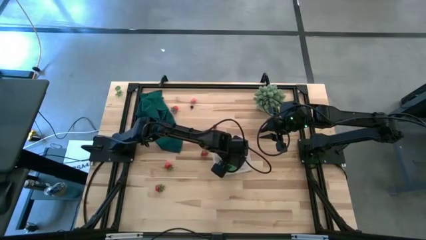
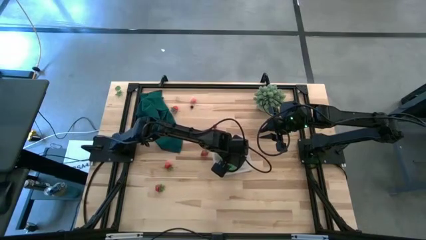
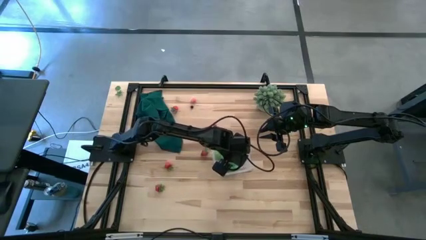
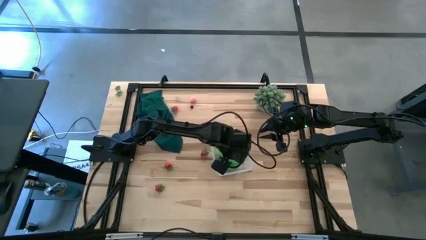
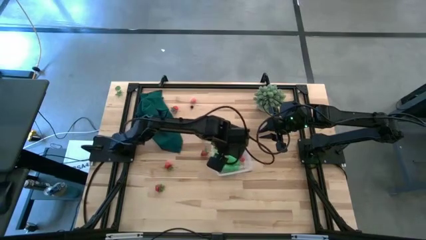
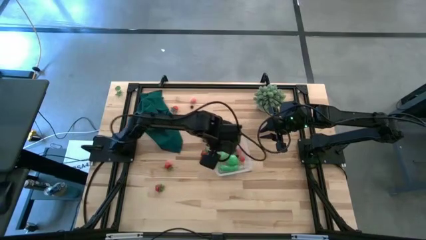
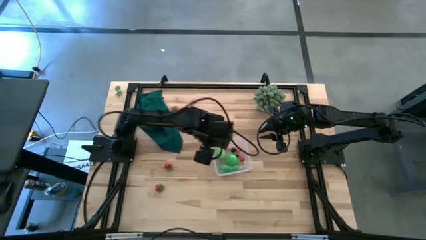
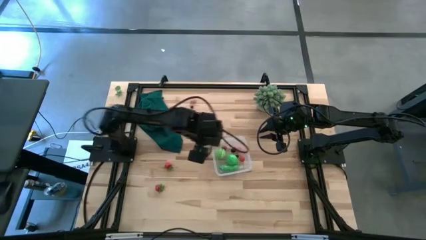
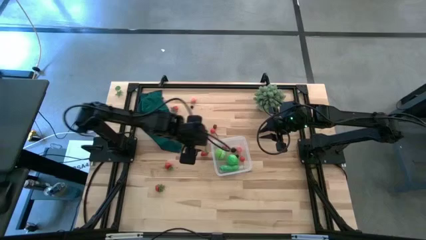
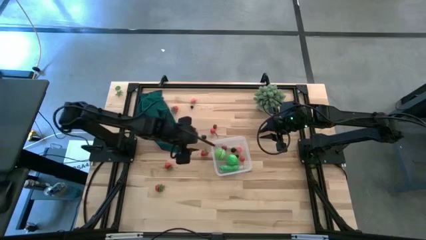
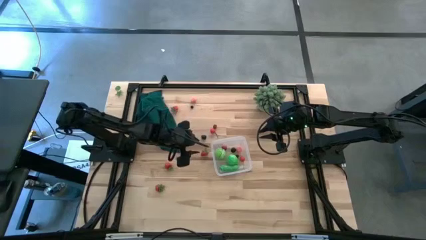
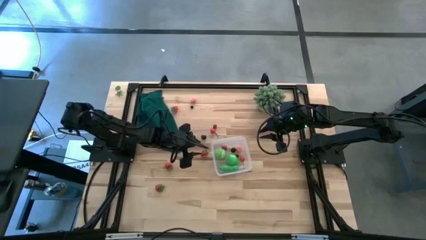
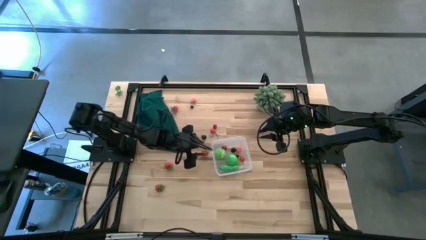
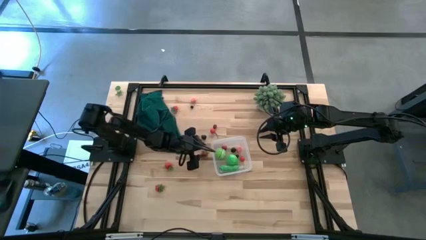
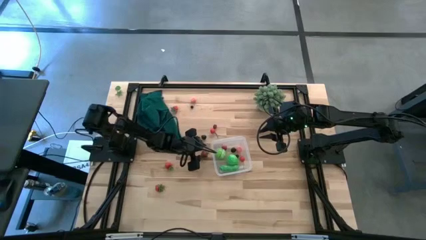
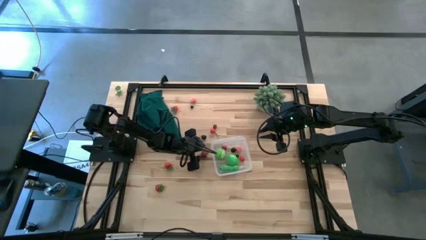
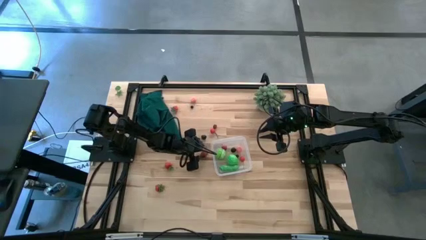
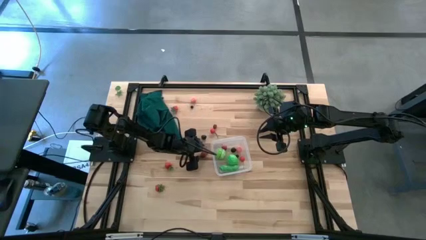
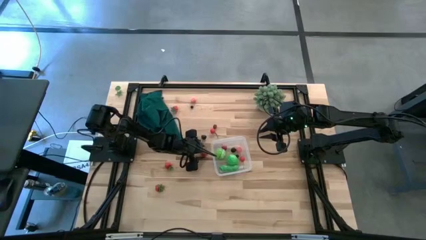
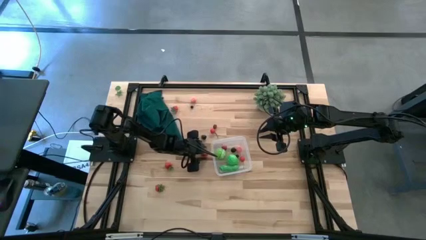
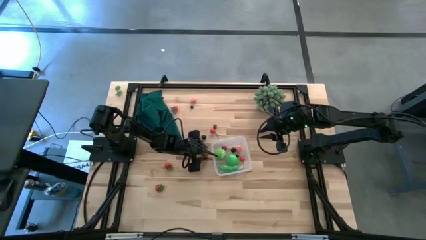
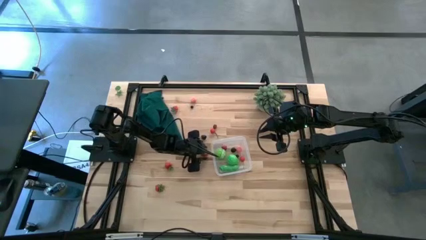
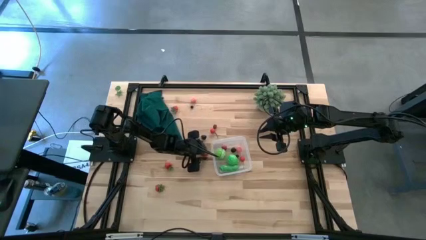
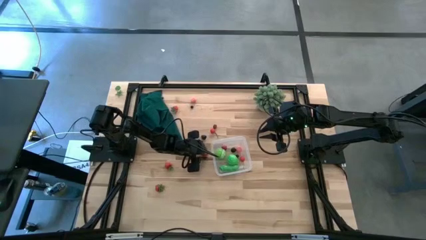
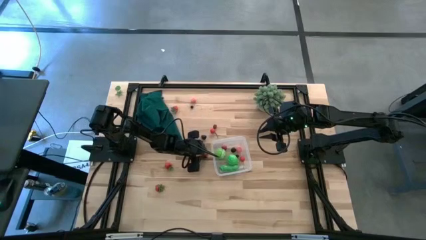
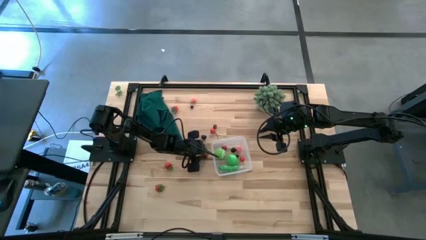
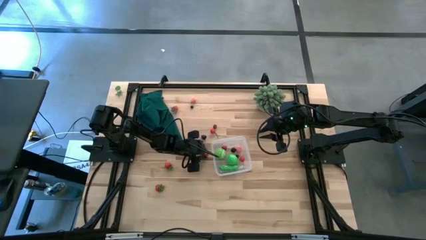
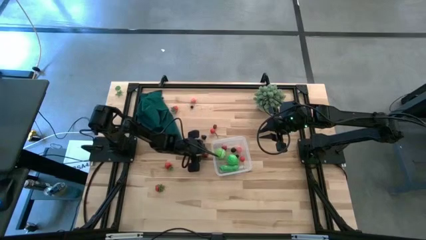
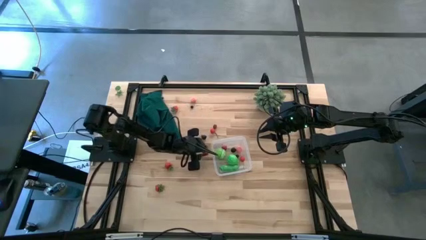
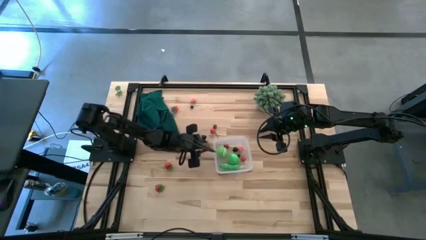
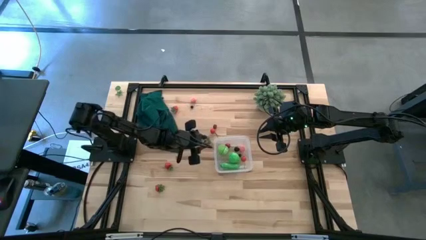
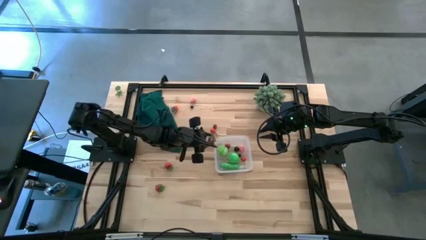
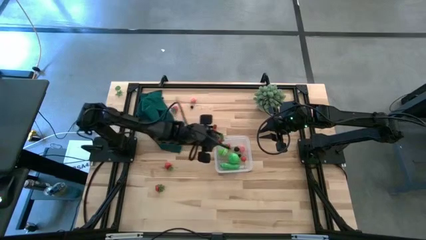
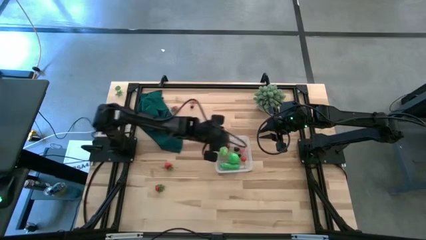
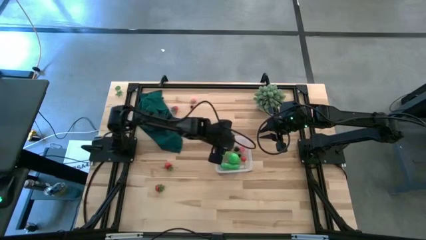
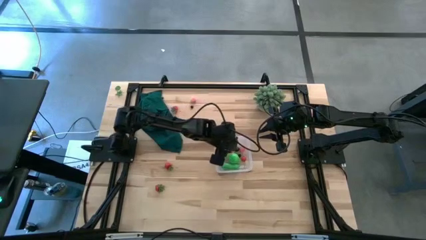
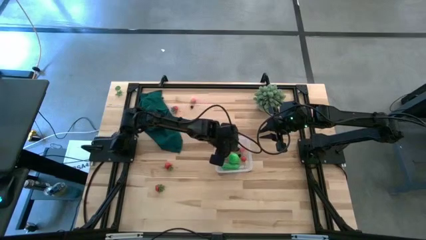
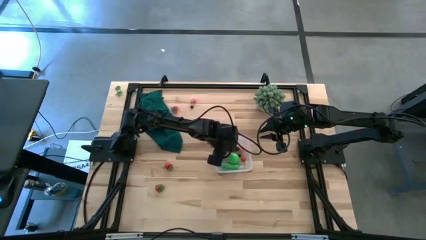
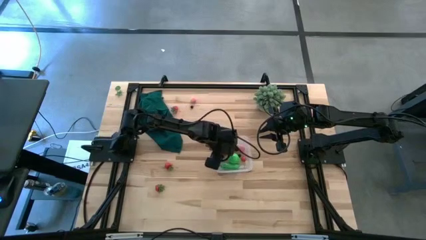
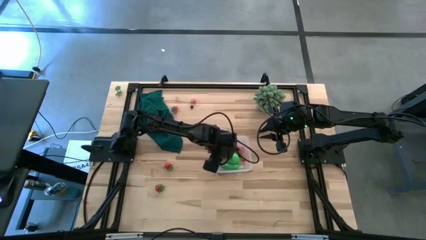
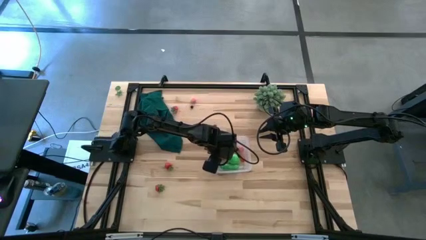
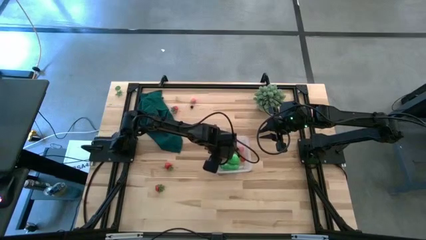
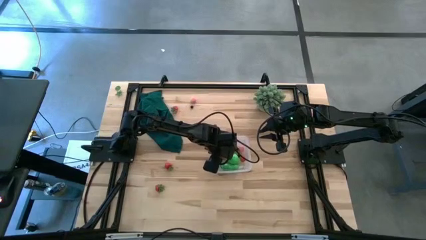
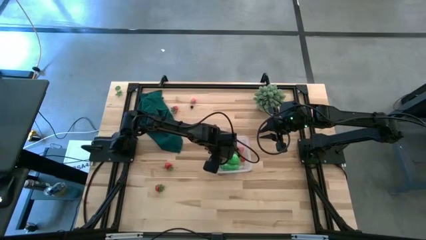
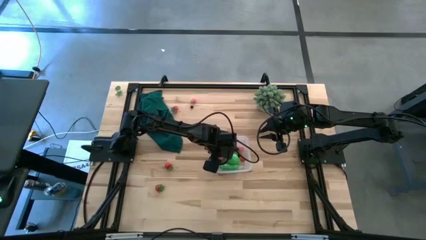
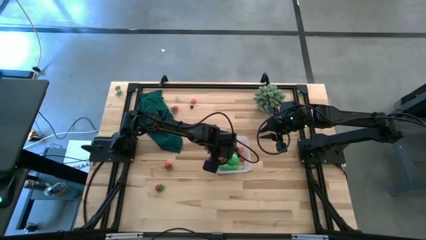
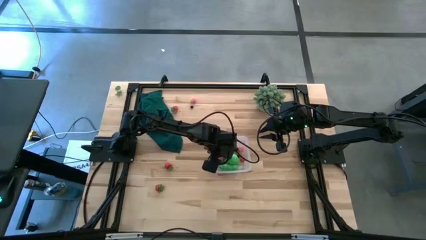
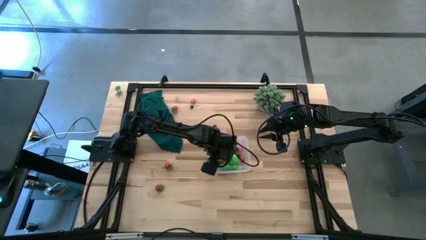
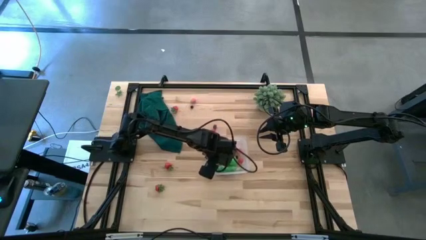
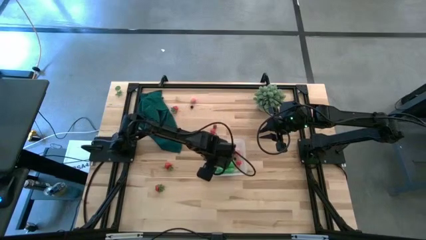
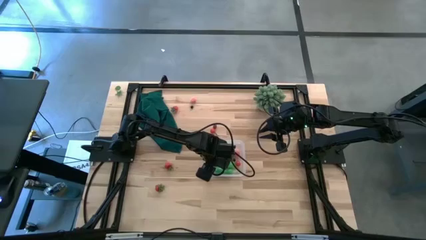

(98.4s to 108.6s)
Task: Pick and placing Produce into tupperware
Put the middle red strawberry into the container

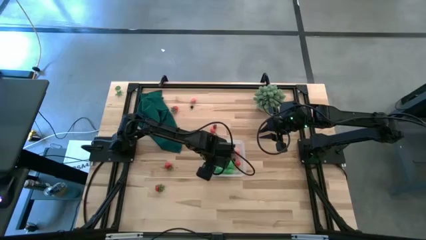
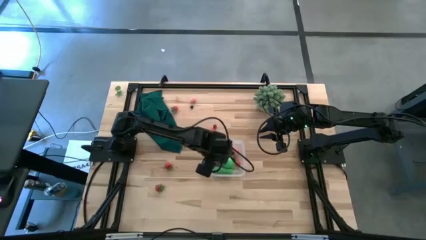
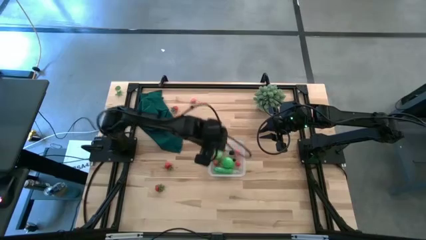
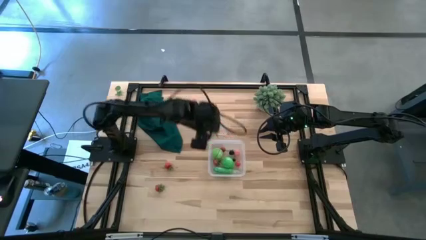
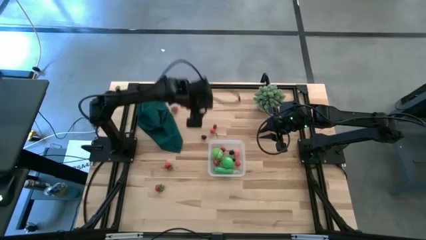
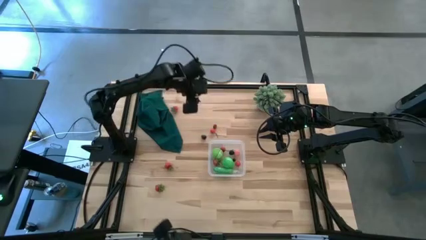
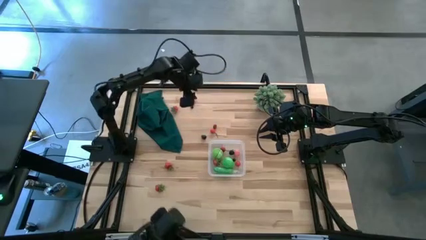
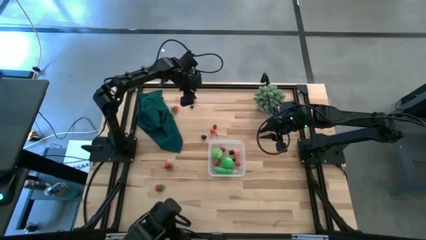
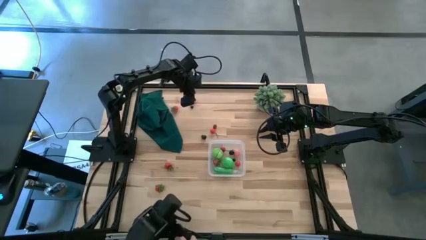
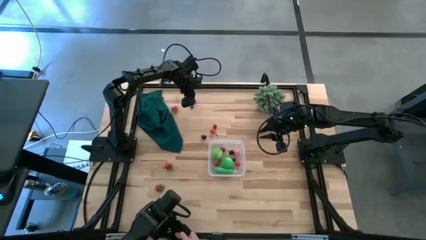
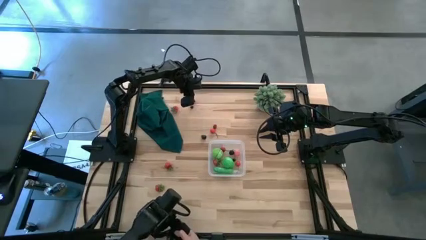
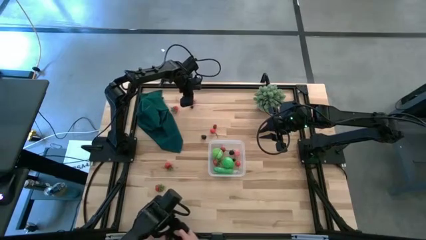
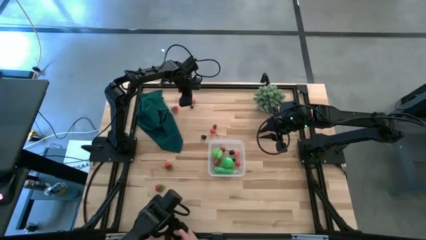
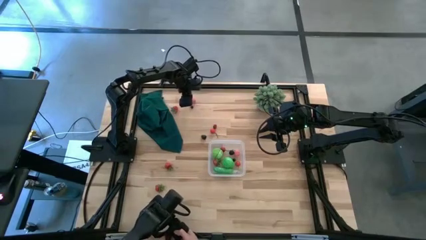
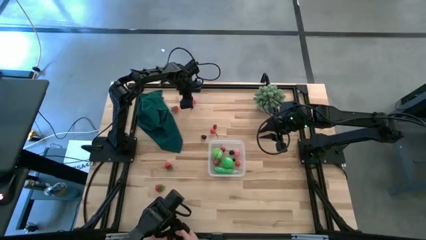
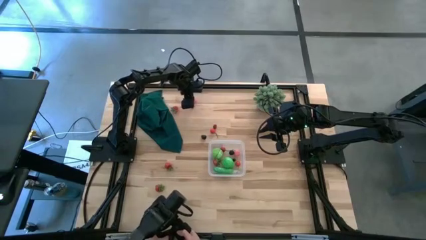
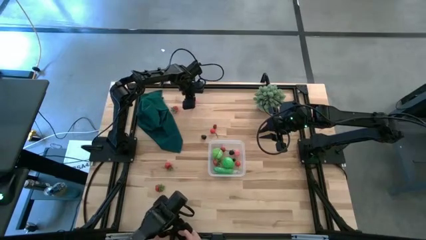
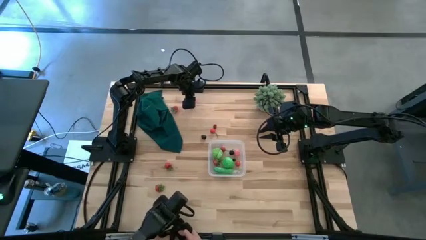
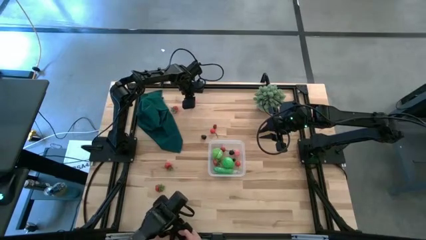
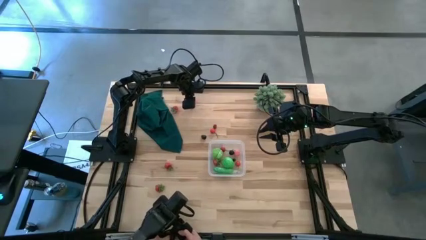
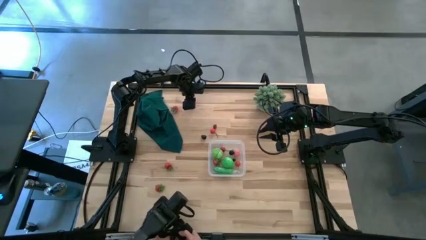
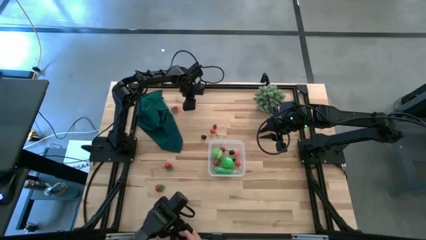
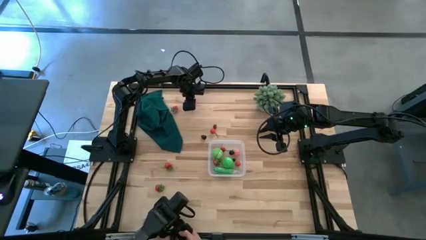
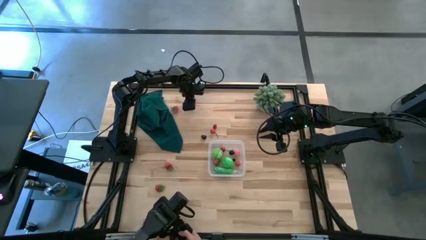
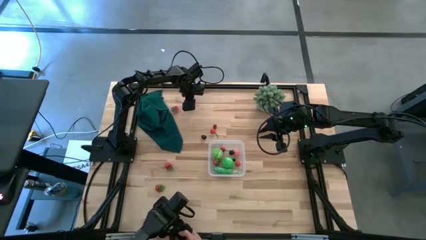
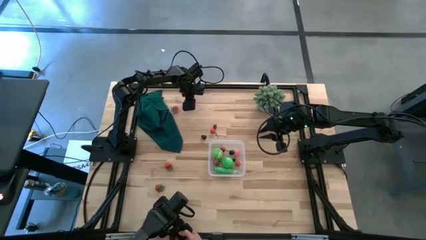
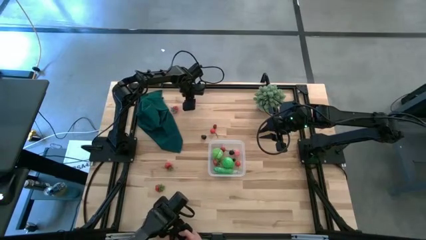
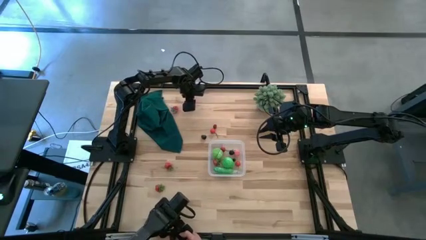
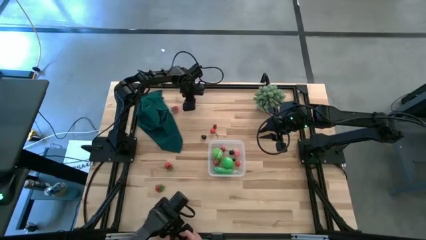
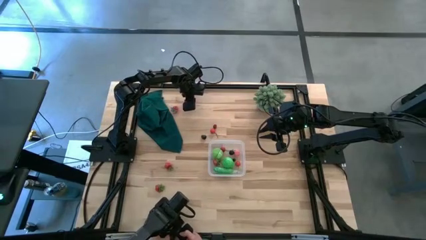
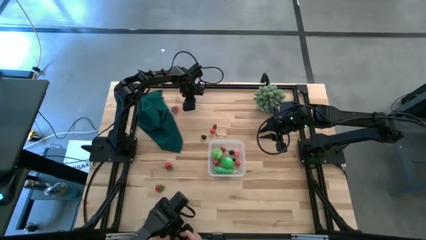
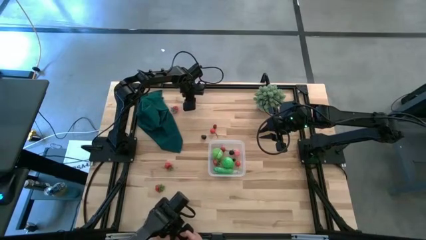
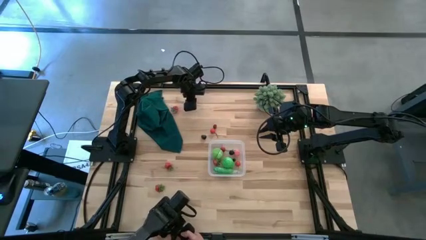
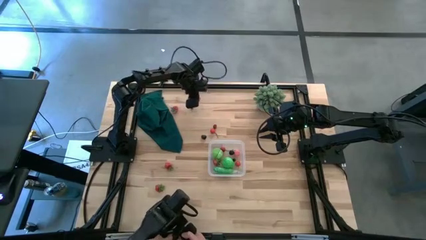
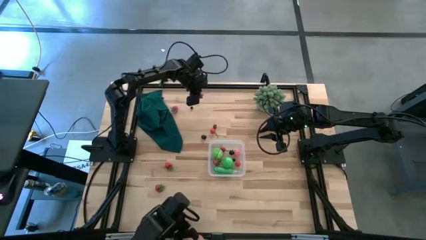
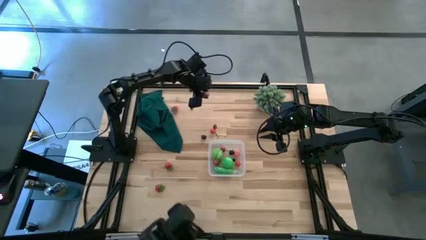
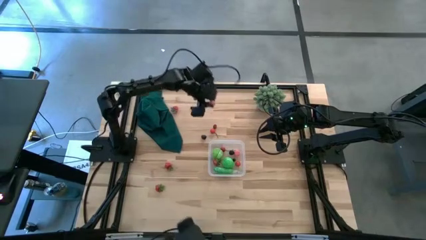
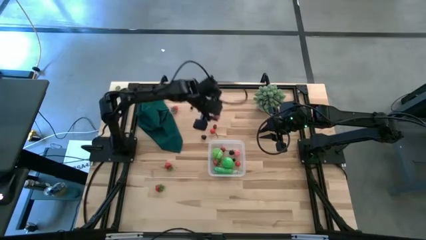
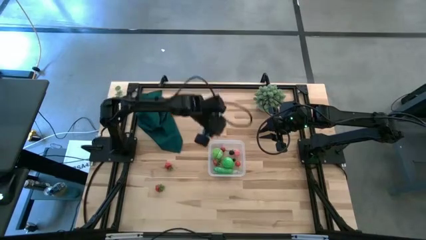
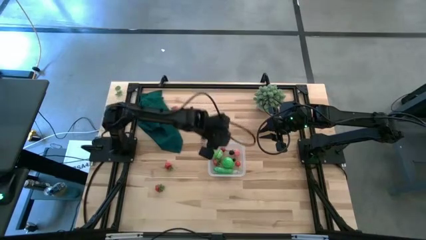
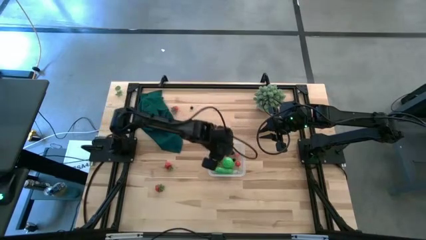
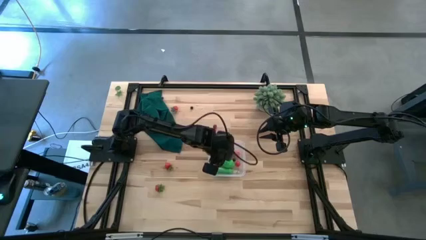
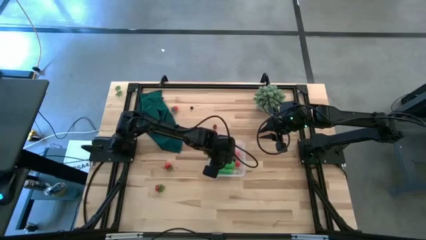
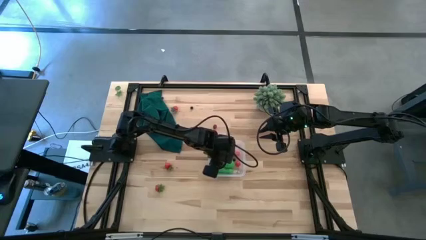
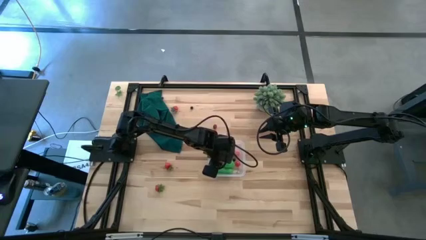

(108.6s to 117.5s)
Put the pink peach into the container
